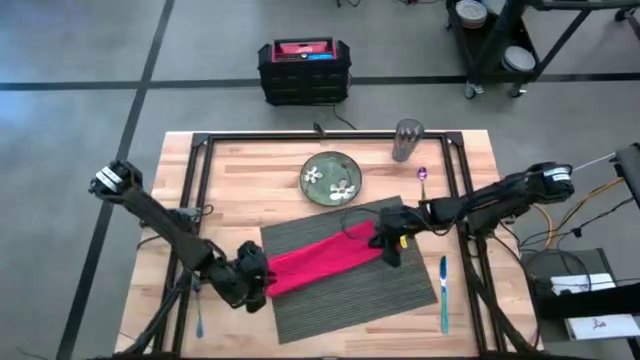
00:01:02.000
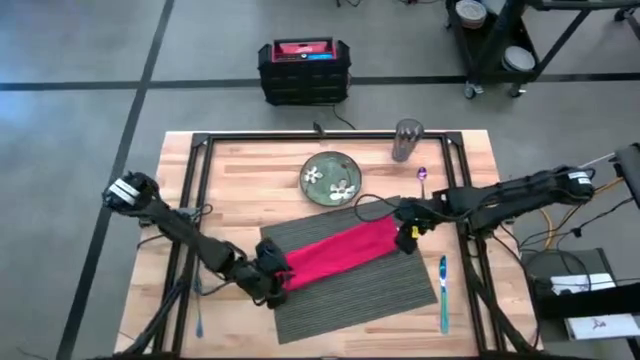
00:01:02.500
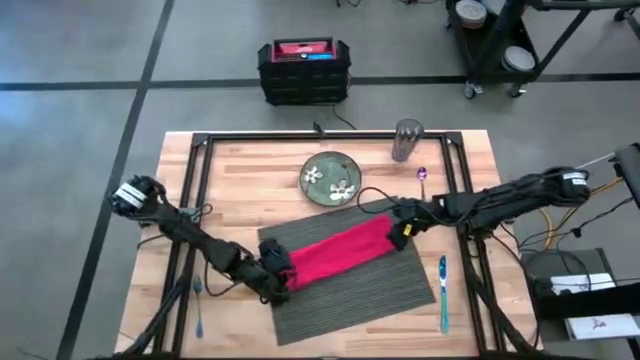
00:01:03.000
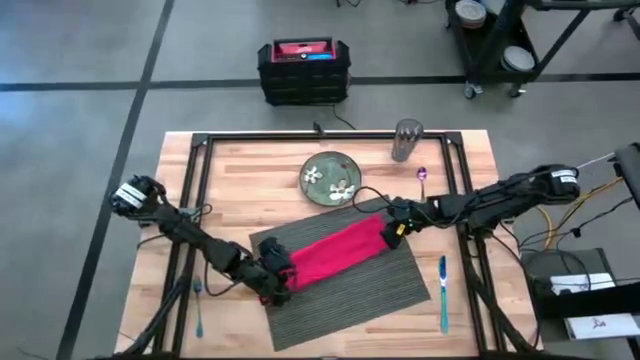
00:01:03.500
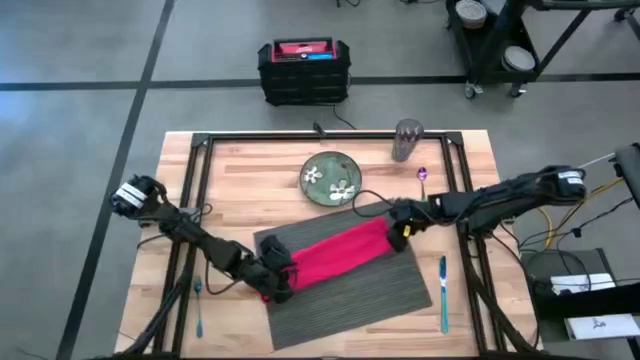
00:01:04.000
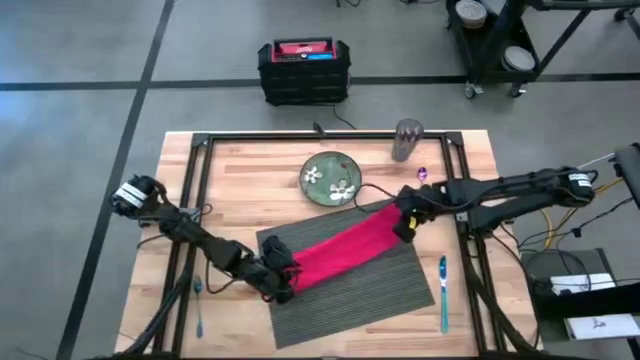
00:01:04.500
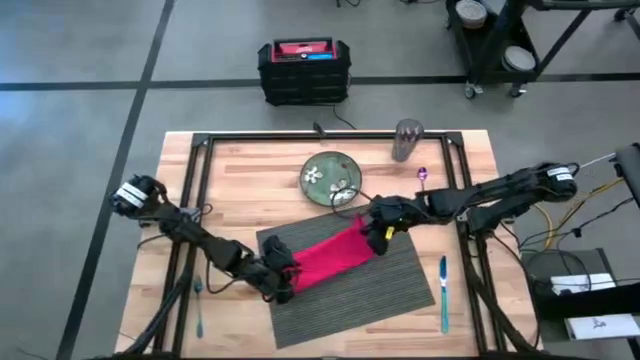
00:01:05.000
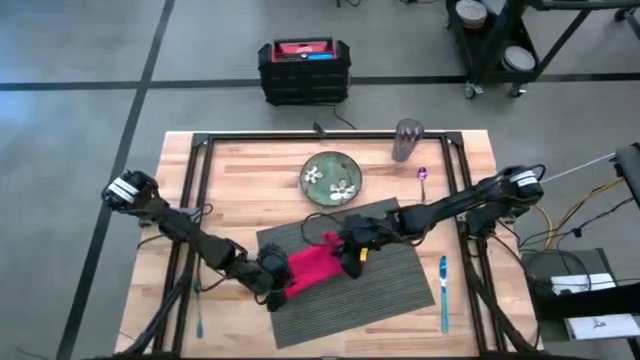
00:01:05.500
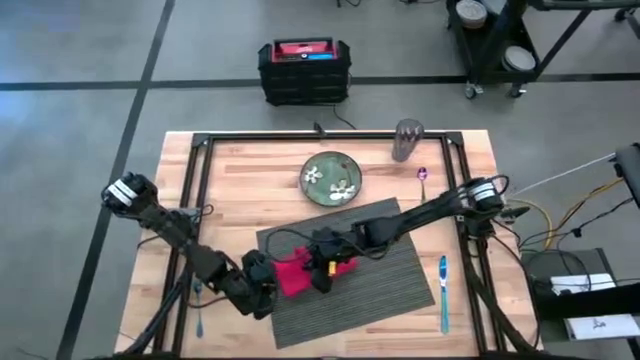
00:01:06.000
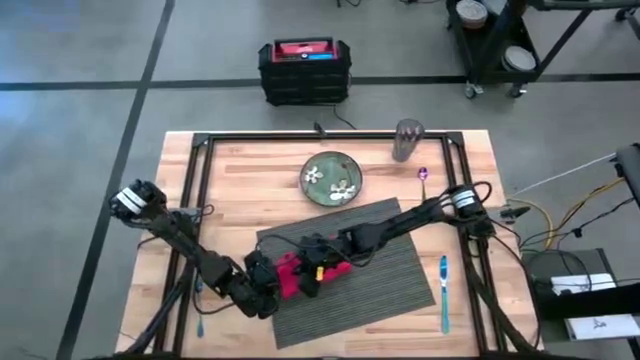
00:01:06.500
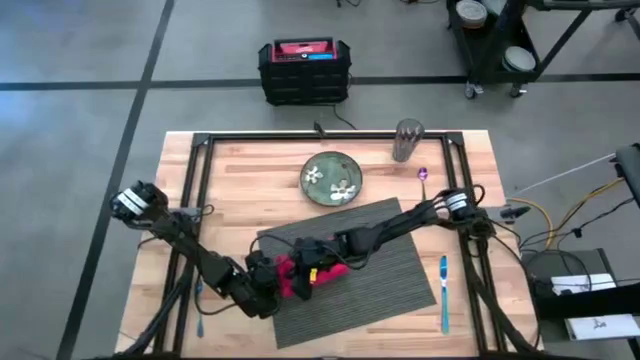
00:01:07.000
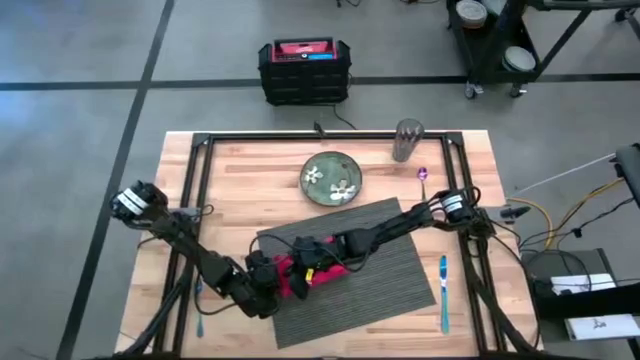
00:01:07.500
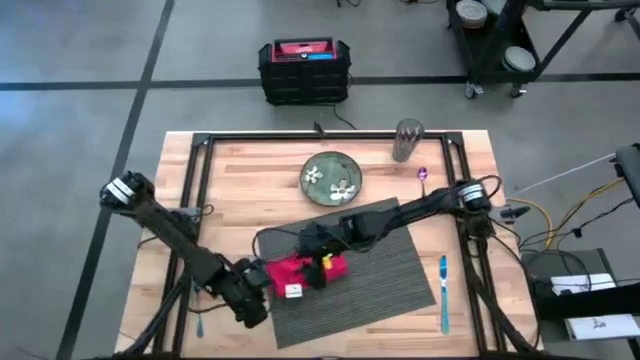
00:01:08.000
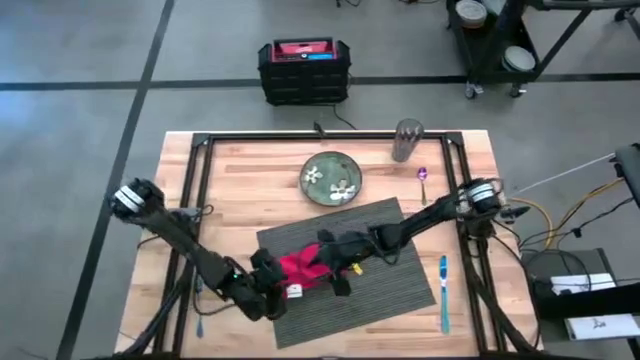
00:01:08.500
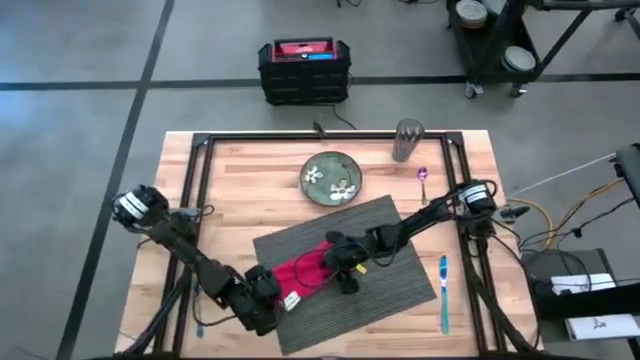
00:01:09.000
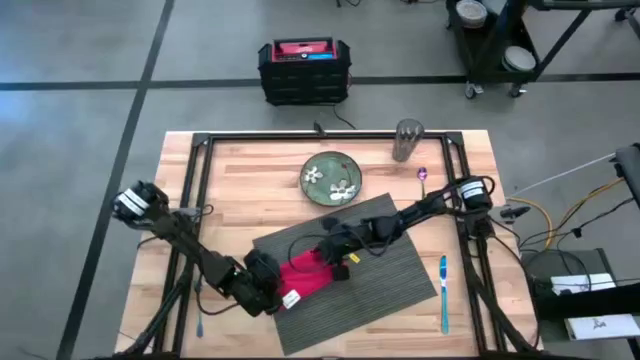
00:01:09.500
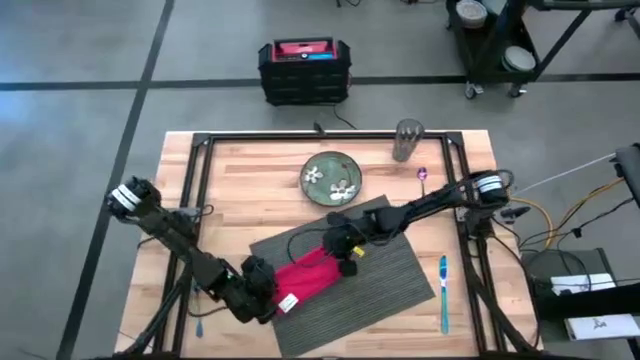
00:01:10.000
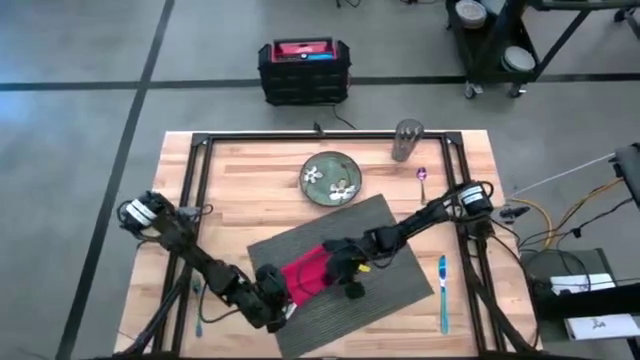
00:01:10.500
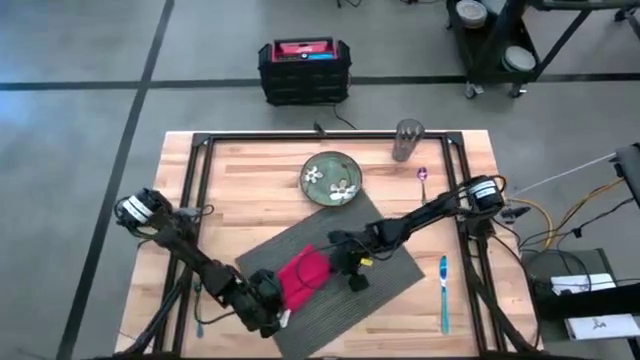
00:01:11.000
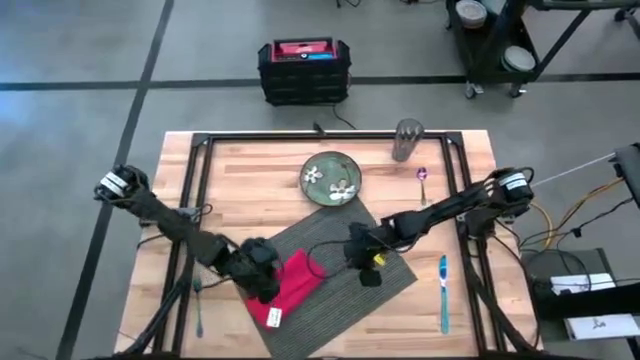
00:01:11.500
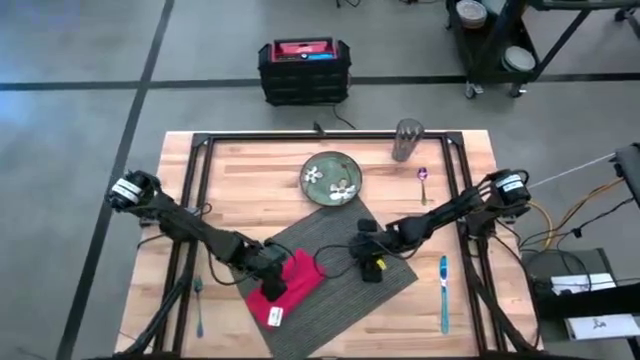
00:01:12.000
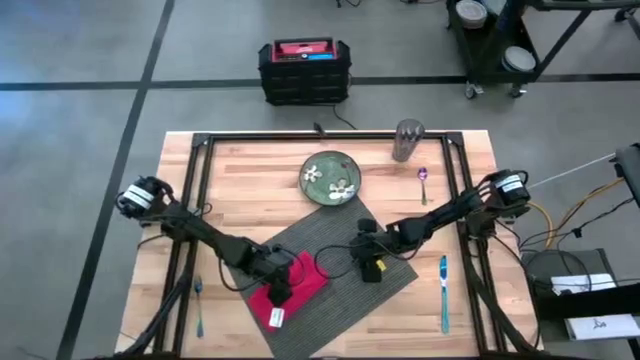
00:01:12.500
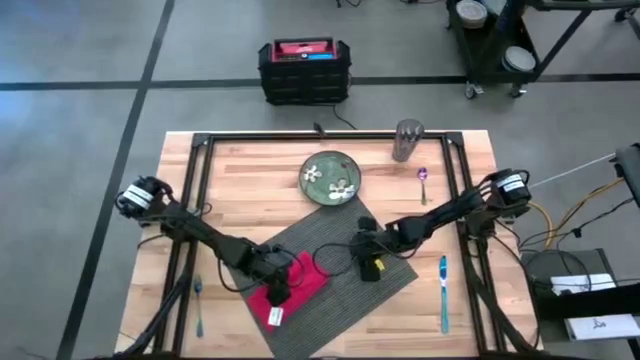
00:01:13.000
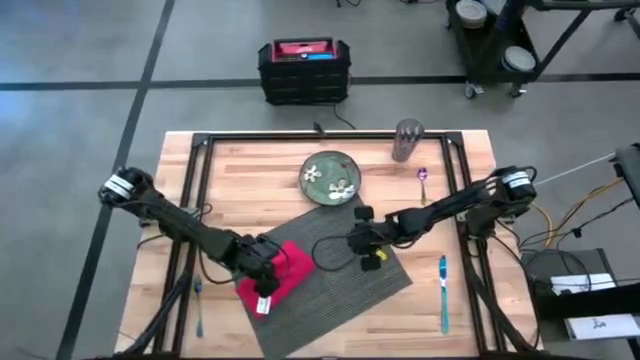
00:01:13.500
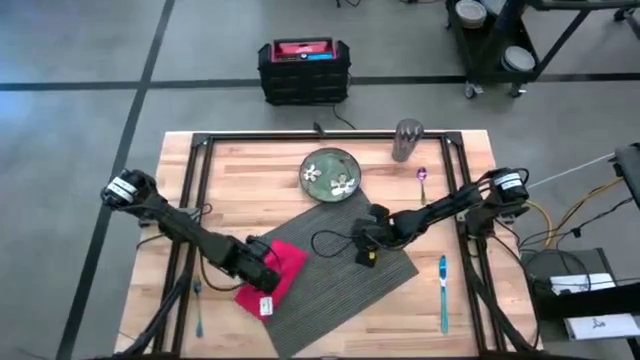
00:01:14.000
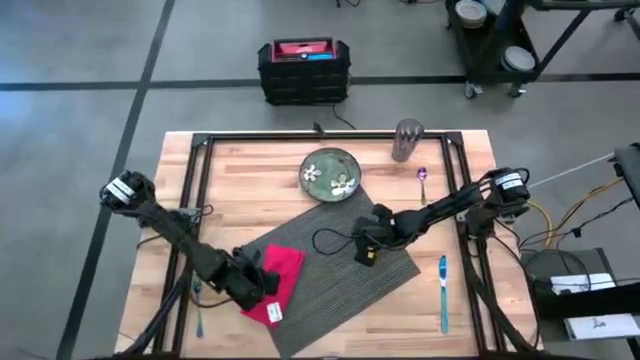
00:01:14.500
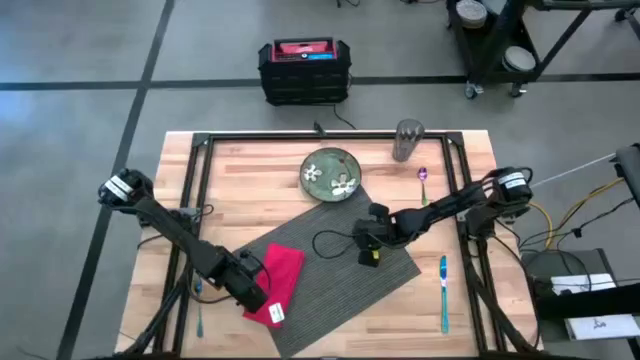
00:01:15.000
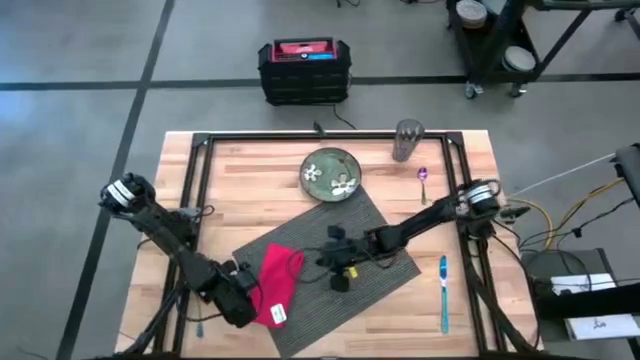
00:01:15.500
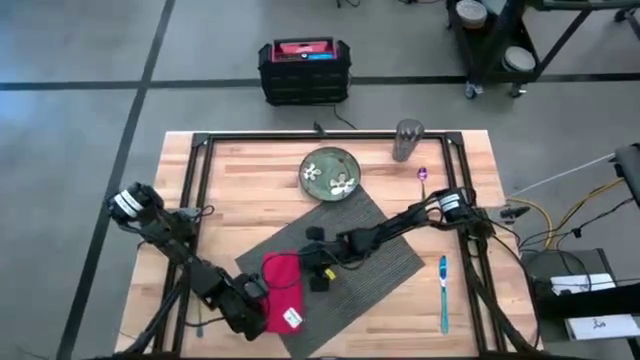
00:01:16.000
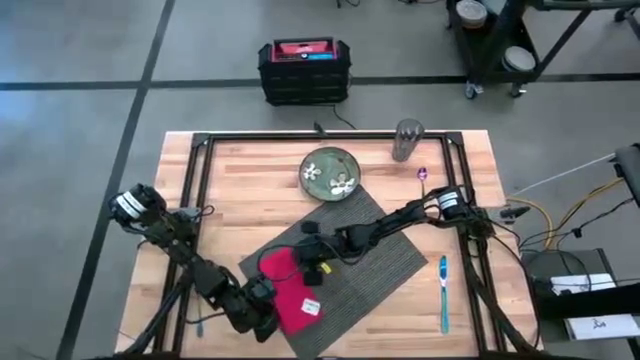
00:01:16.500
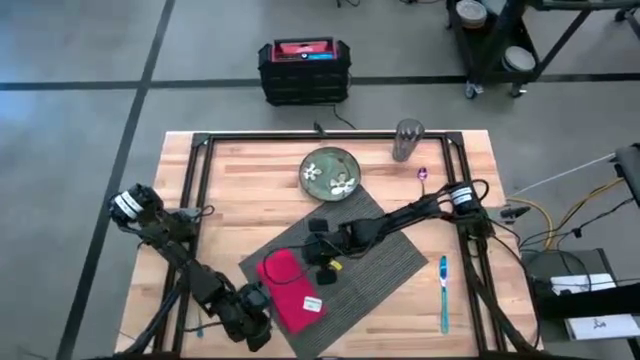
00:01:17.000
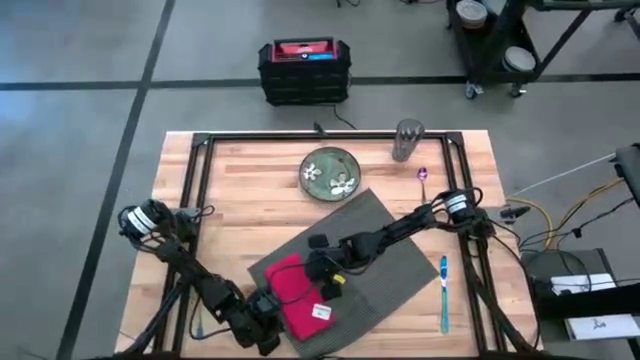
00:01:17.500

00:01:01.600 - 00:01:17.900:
Task: Set table place
Fold the red table napkin

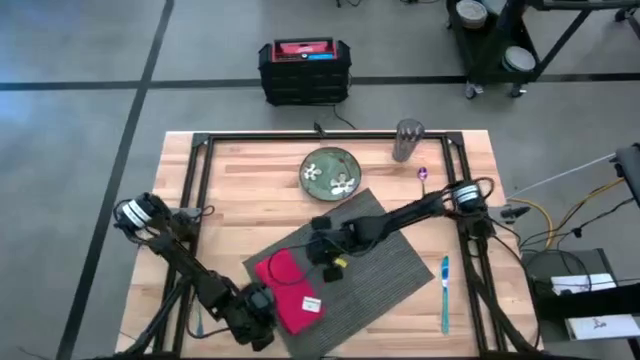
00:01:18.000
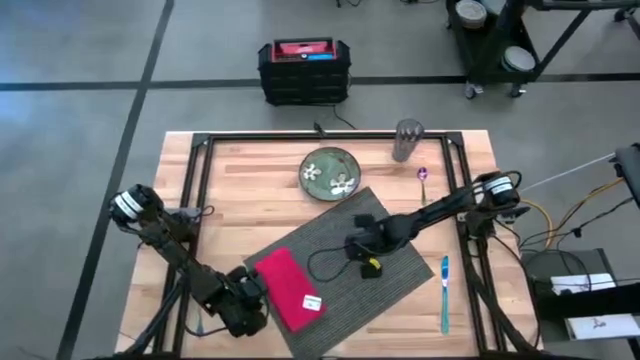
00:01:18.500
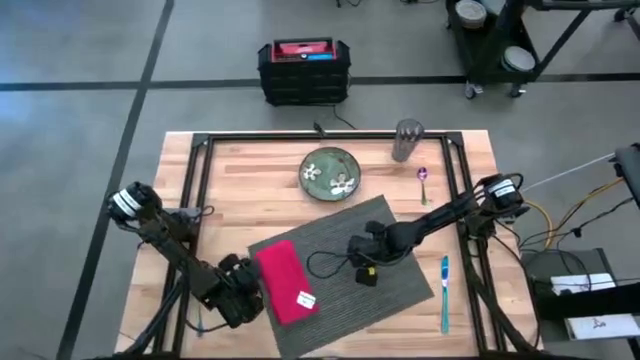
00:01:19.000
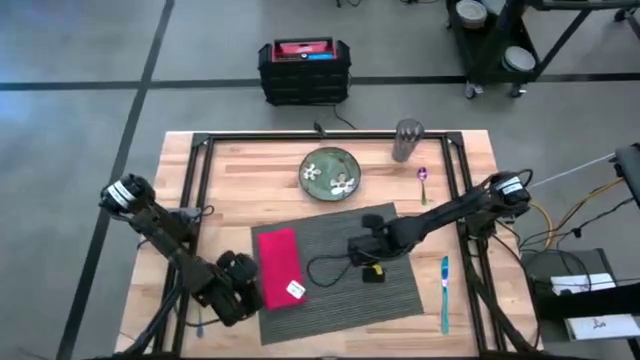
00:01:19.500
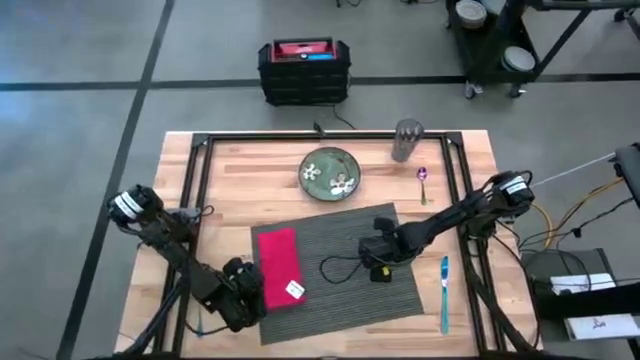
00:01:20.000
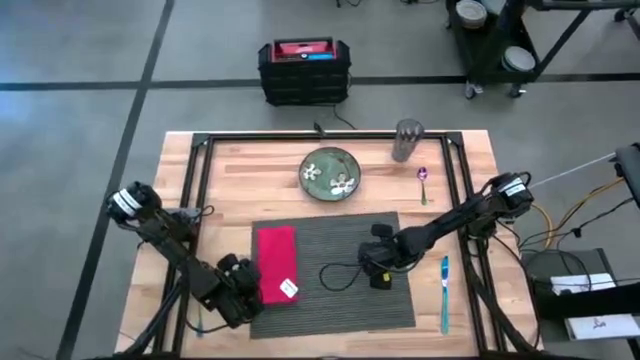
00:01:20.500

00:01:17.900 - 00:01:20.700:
Adjust the gray tablemat

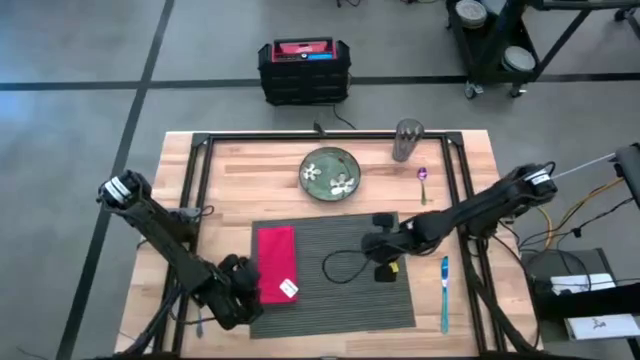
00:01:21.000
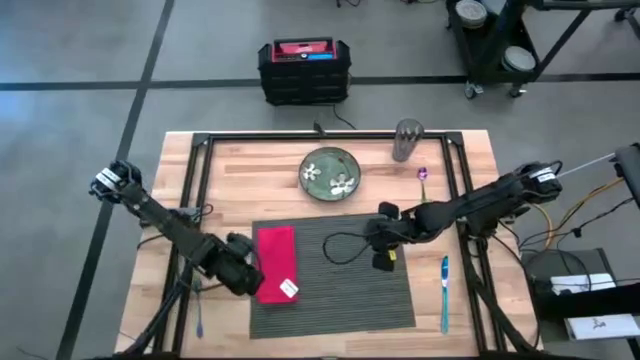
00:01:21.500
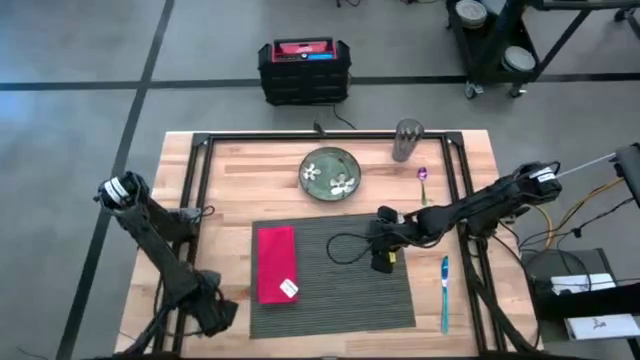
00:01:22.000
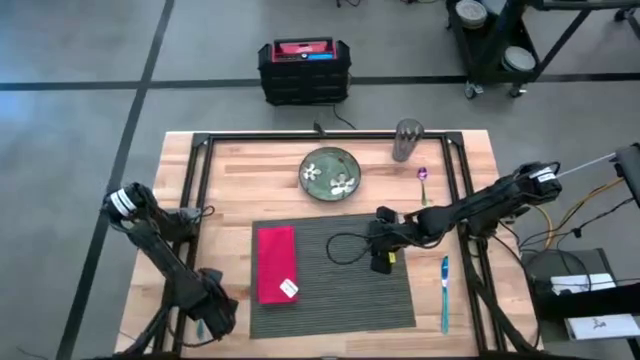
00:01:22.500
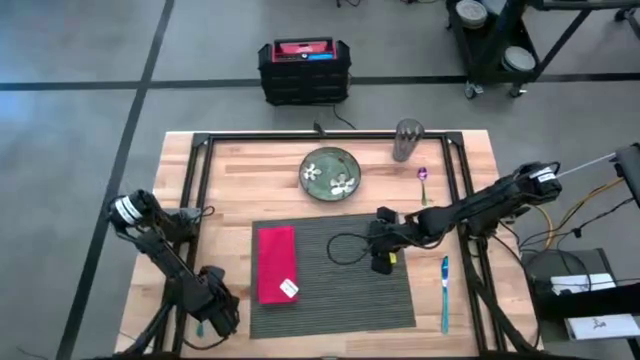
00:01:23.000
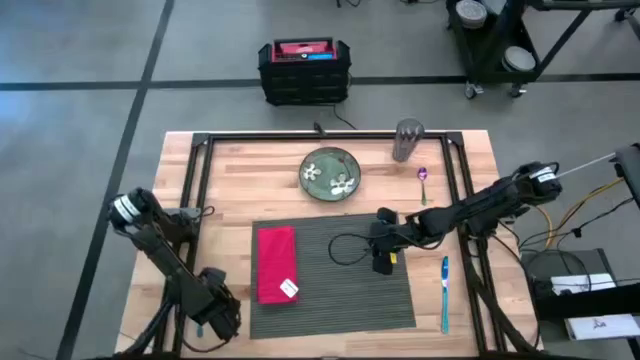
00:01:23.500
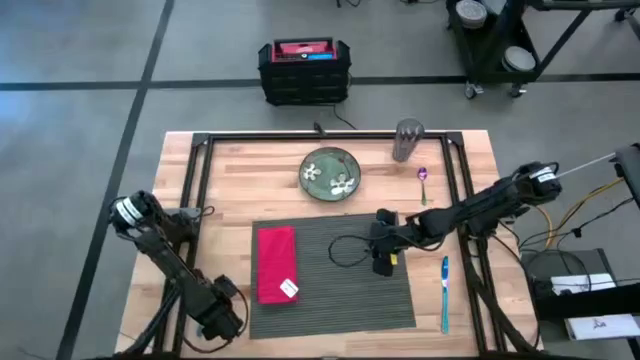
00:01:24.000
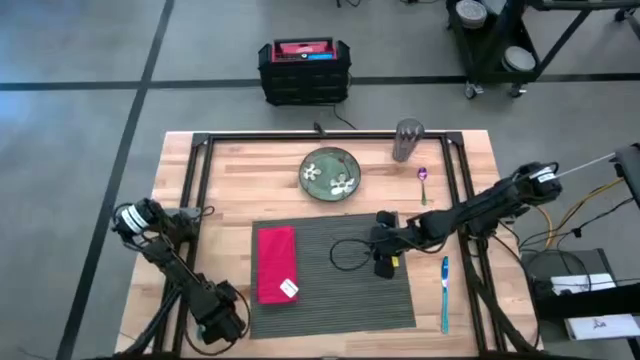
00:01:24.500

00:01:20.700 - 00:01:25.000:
Put the blue fork on the red table napkin
